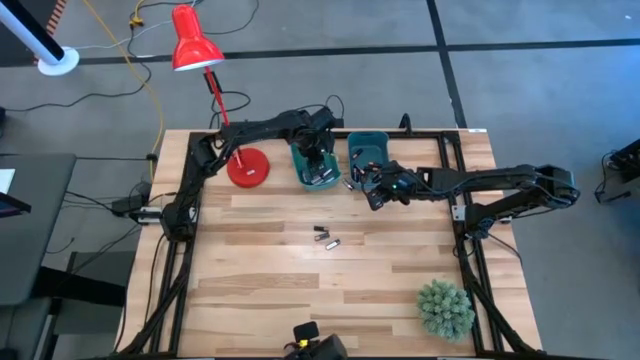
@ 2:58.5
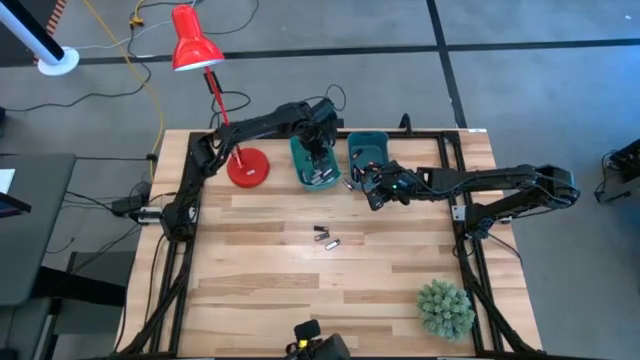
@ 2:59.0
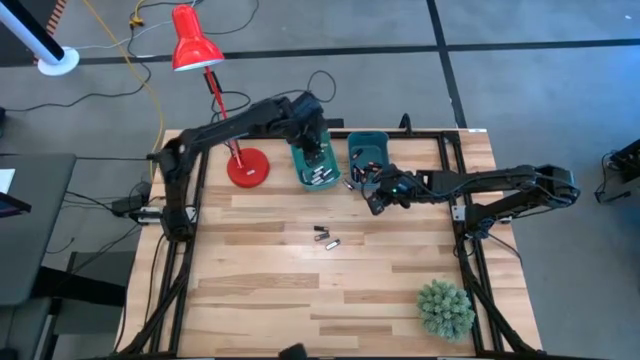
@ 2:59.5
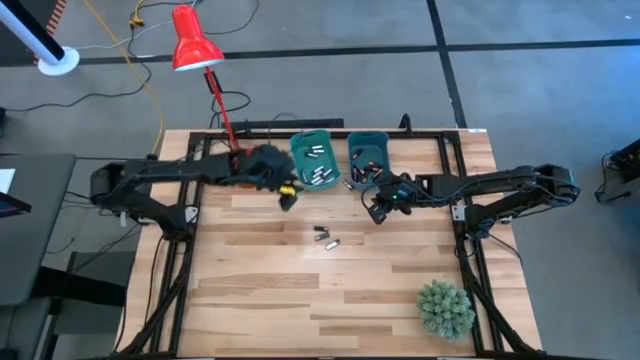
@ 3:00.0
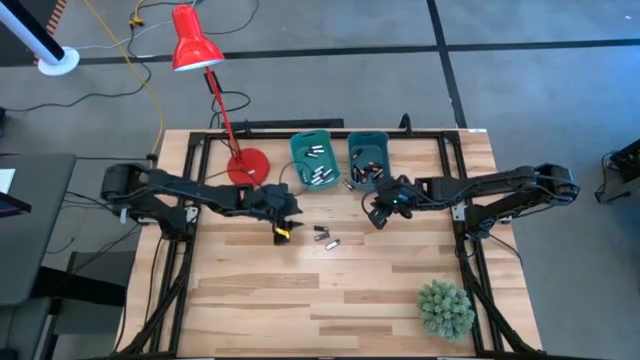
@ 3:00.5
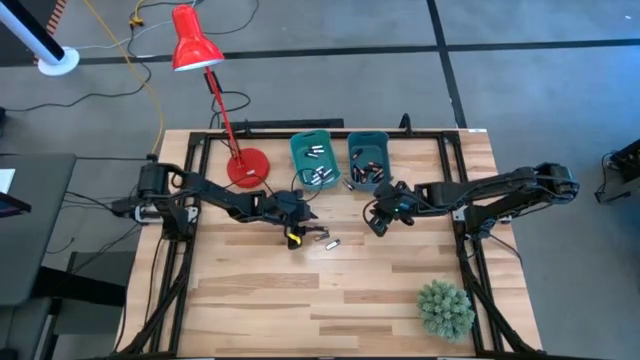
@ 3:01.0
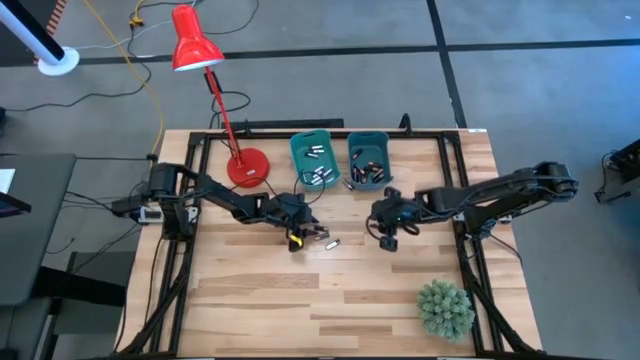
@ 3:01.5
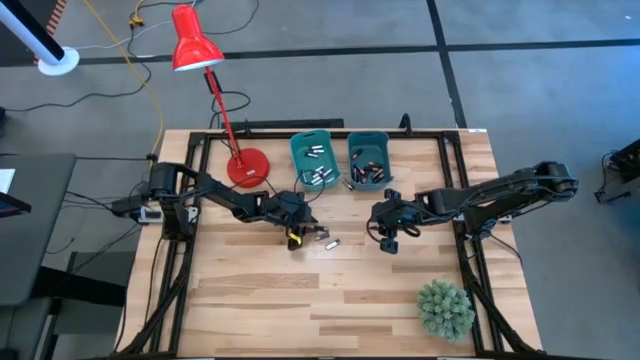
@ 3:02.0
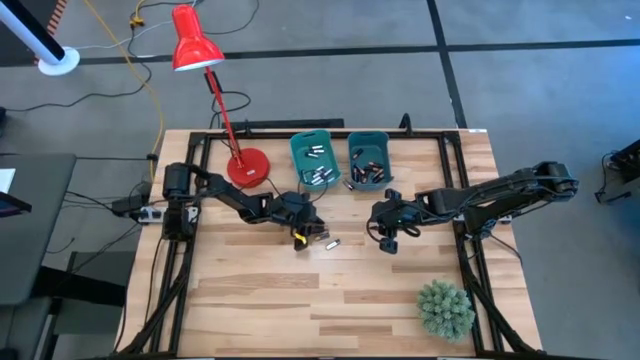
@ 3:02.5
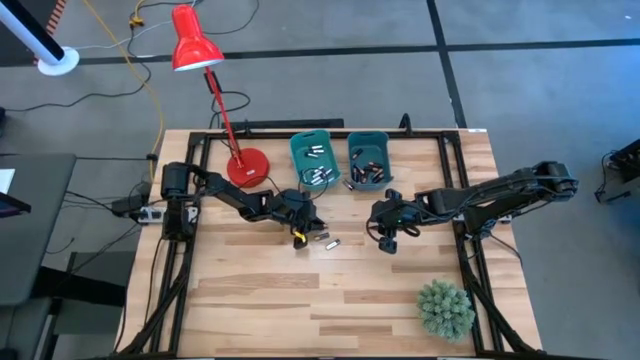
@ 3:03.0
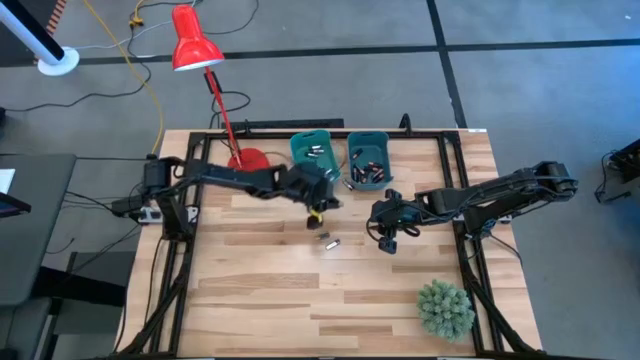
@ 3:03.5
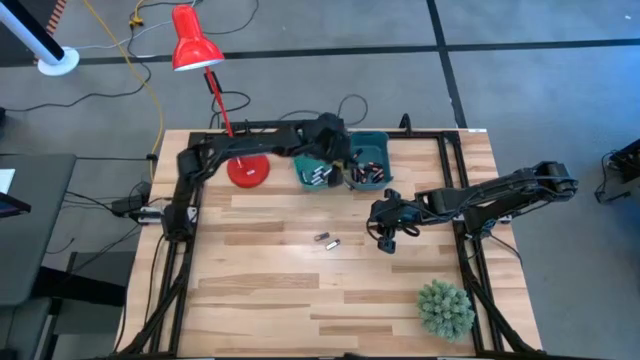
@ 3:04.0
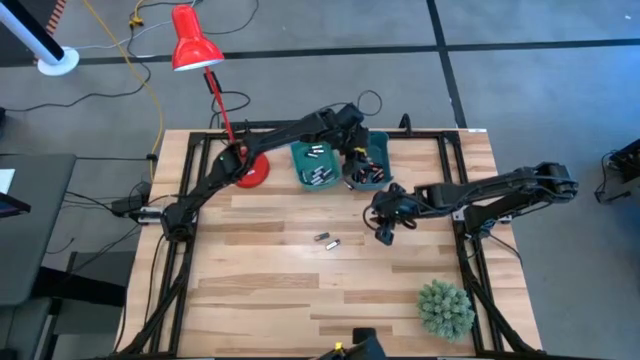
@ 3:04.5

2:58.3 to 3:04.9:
Task: Sort batteries
Put the black battery into the blue bin

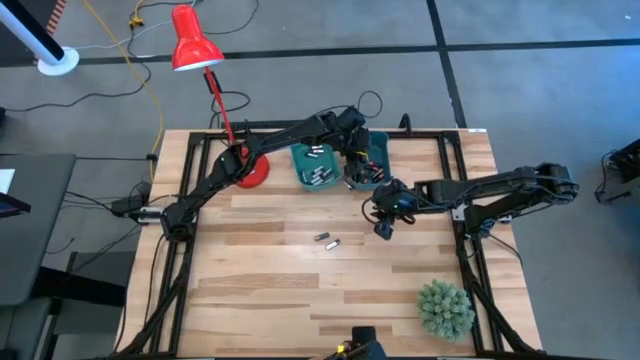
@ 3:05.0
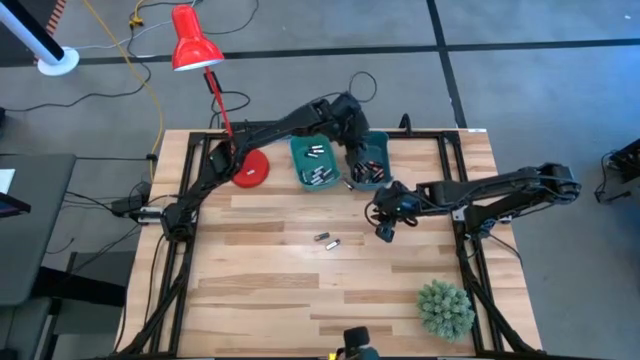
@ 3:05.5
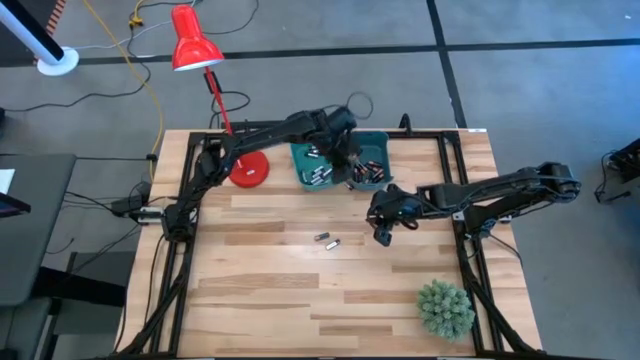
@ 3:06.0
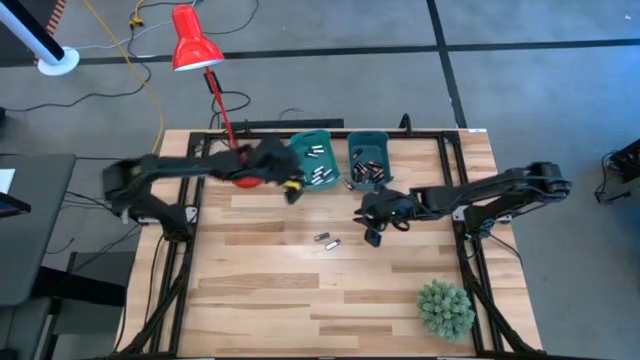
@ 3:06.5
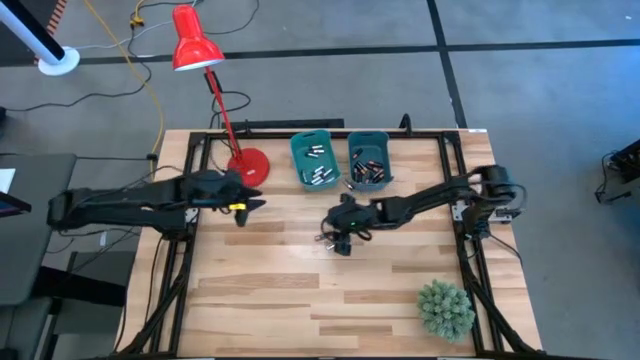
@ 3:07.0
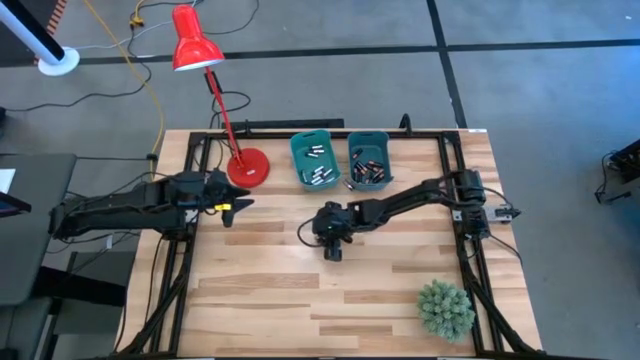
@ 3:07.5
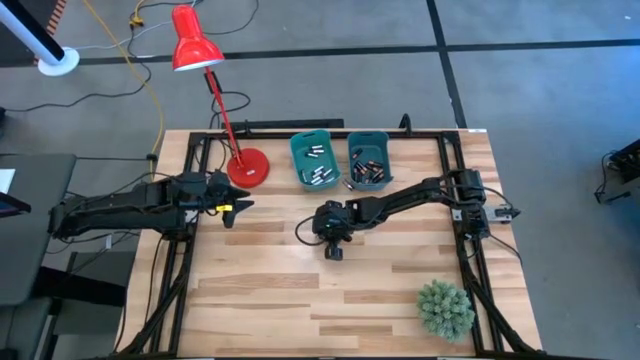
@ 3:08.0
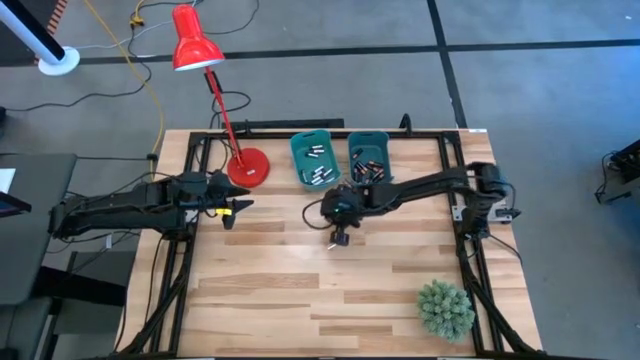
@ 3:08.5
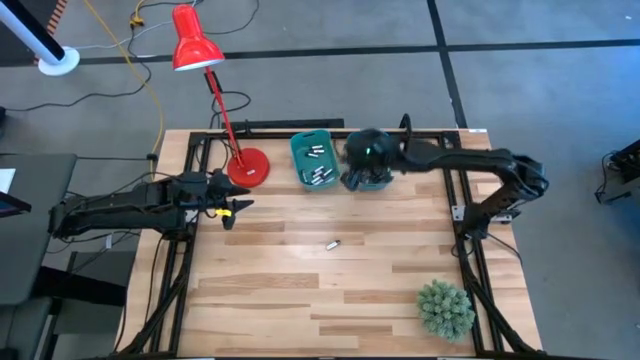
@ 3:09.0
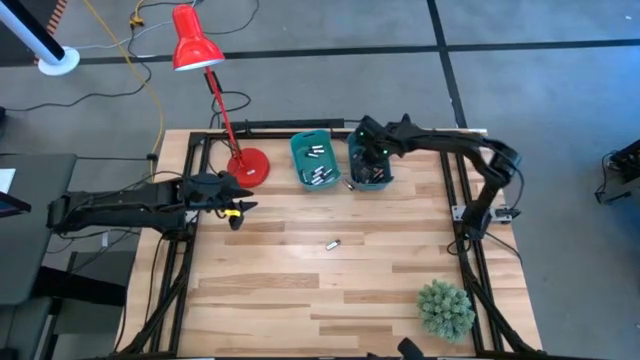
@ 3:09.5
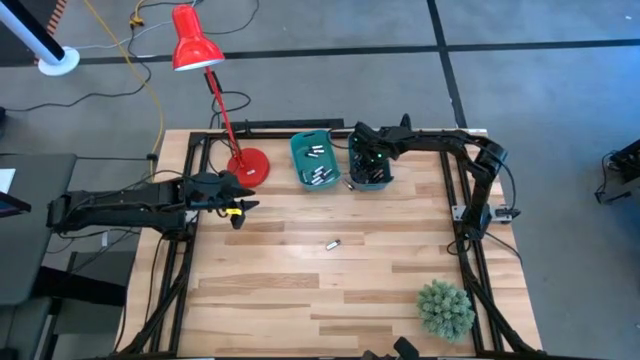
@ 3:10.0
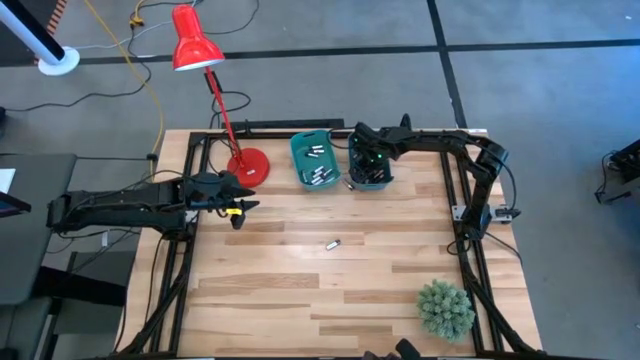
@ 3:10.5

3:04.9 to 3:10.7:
Put the black battery into the blue bin

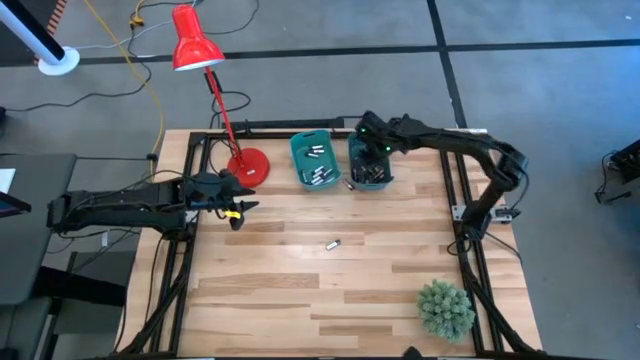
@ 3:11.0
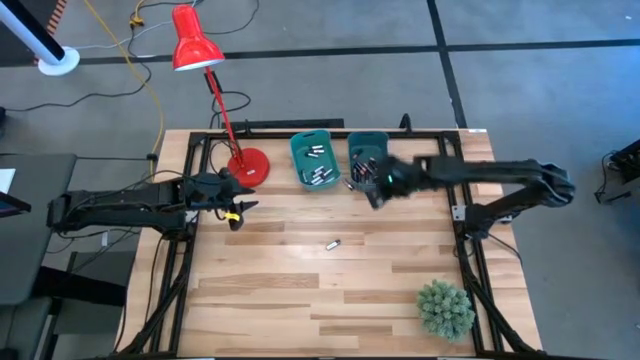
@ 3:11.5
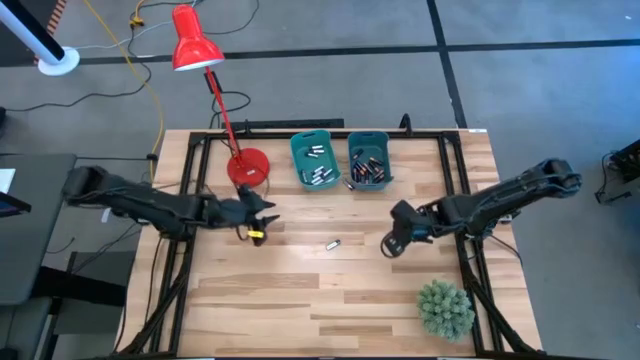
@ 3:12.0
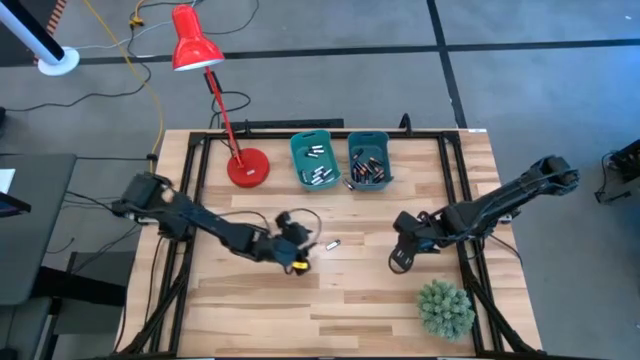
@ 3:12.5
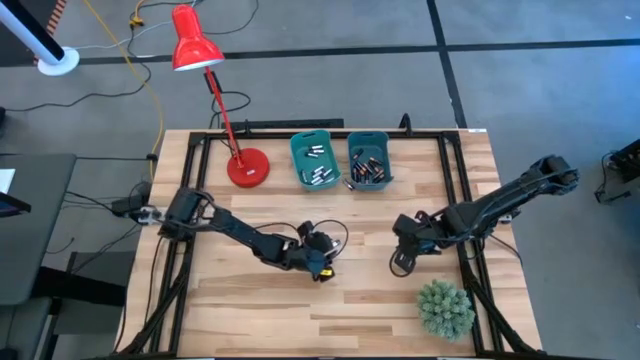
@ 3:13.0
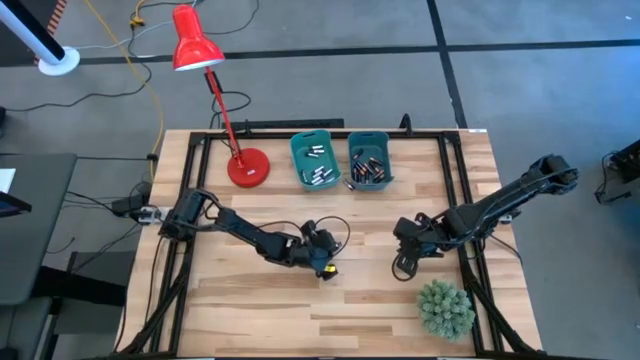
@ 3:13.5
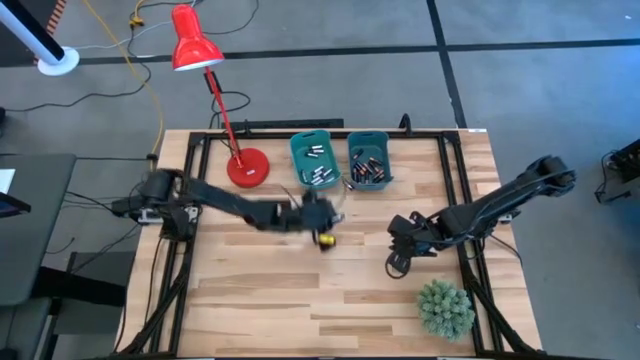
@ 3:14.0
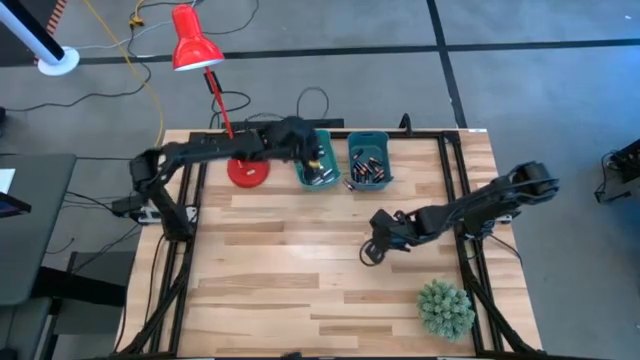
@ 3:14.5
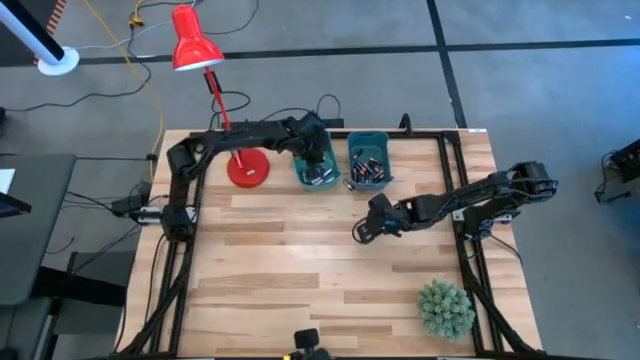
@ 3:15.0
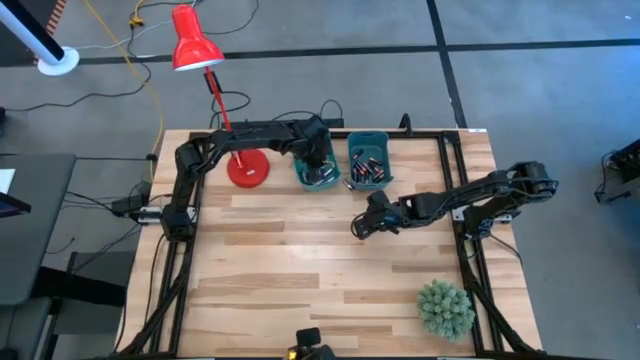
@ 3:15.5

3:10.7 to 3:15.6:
Put the silver battery into the green bin

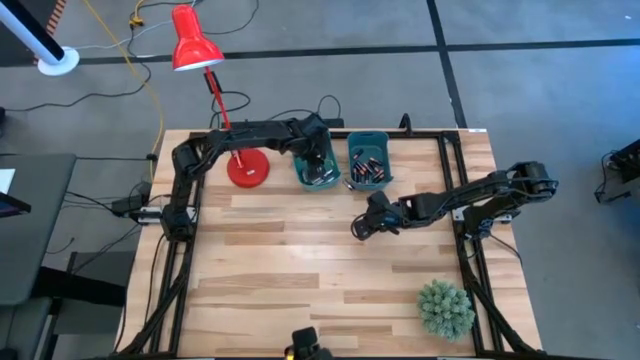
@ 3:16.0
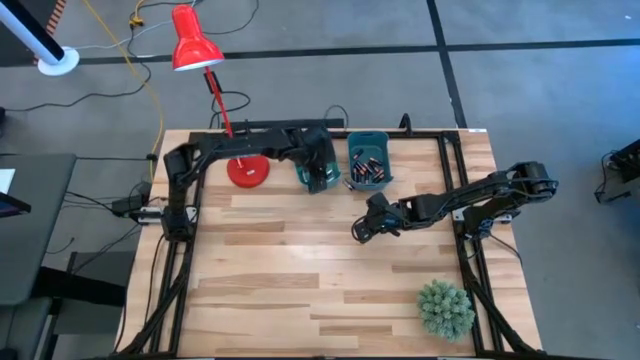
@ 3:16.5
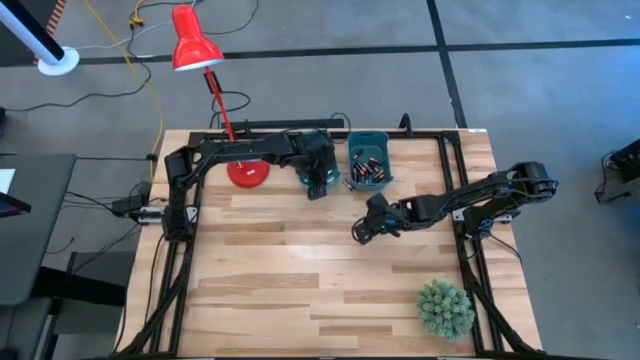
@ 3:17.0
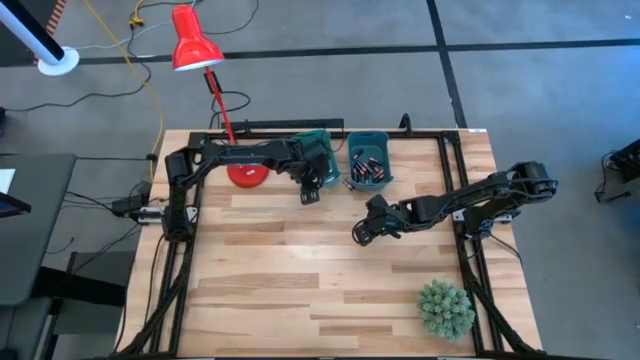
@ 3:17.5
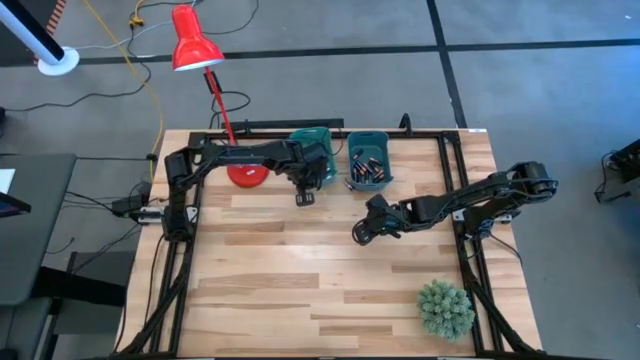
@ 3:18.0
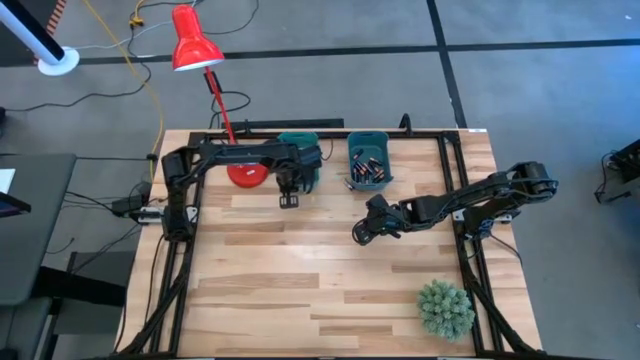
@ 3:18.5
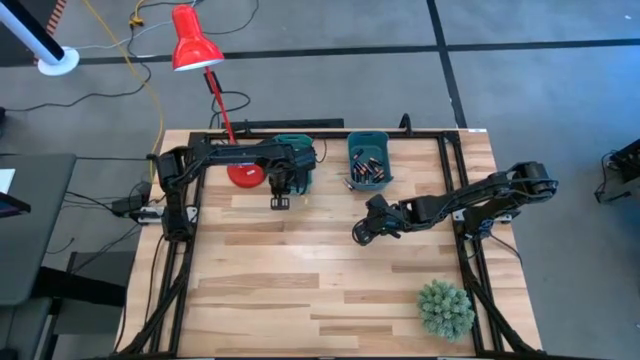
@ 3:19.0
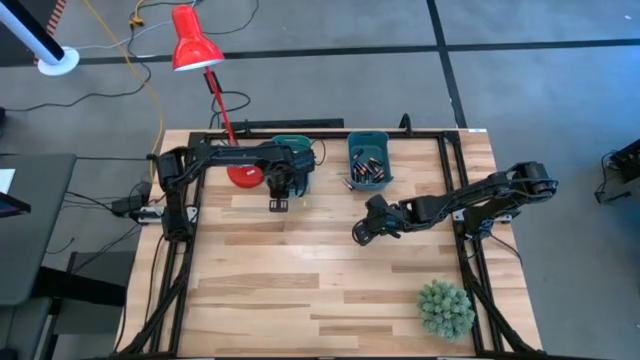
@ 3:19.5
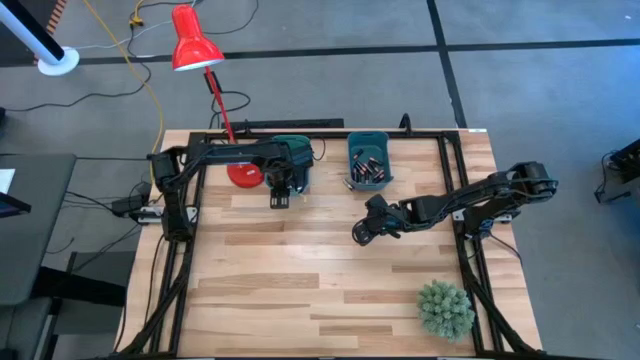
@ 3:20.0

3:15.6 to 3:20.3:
Adjust the green bin on the table
